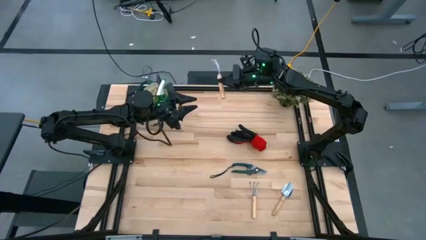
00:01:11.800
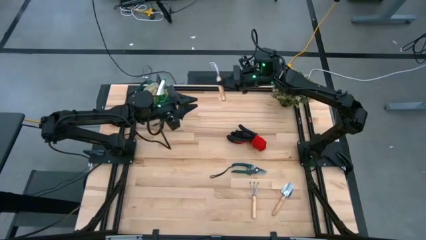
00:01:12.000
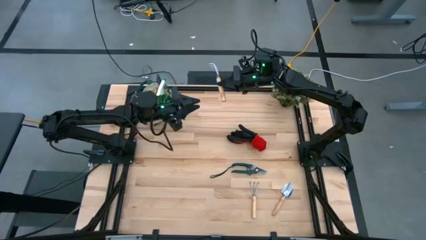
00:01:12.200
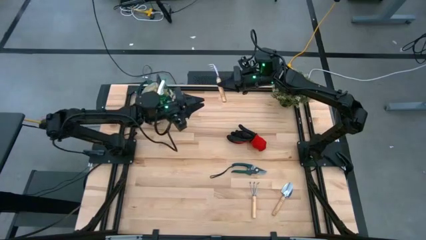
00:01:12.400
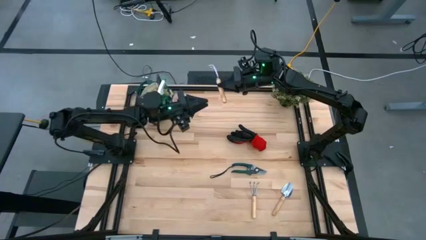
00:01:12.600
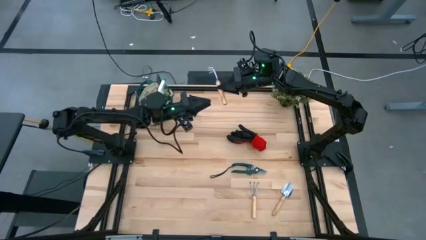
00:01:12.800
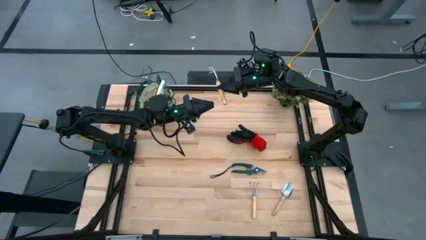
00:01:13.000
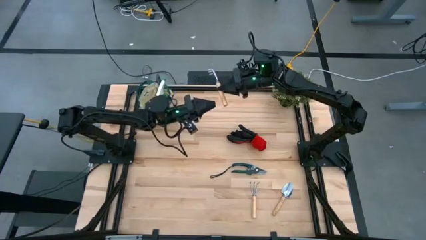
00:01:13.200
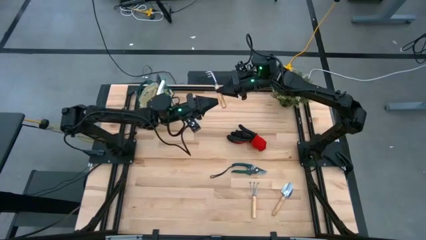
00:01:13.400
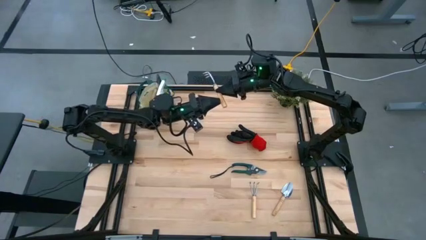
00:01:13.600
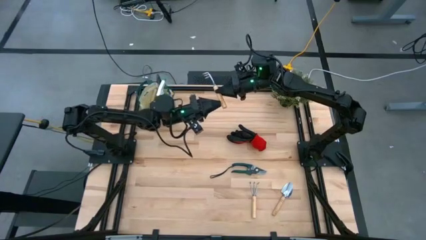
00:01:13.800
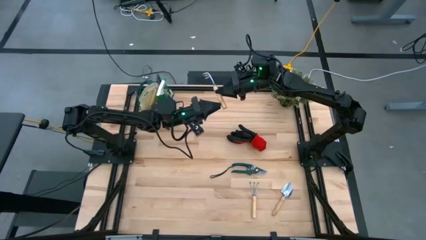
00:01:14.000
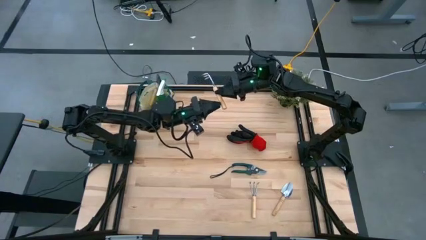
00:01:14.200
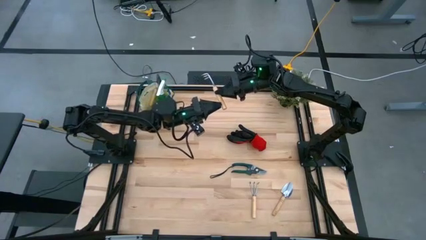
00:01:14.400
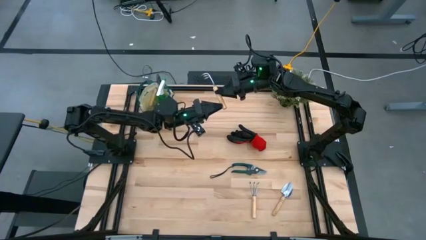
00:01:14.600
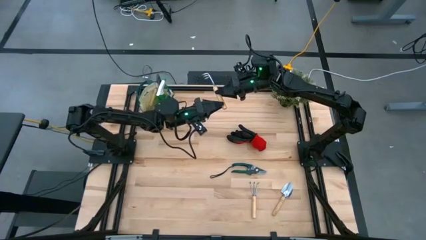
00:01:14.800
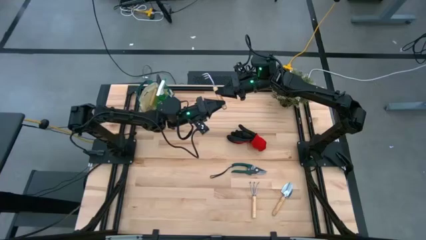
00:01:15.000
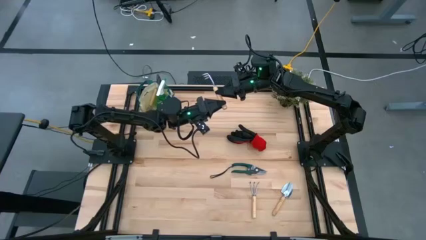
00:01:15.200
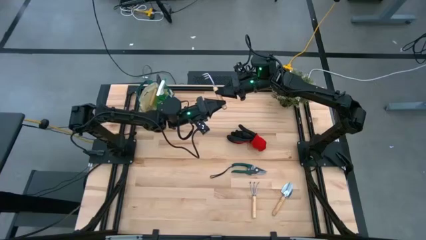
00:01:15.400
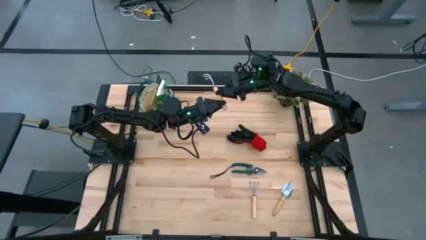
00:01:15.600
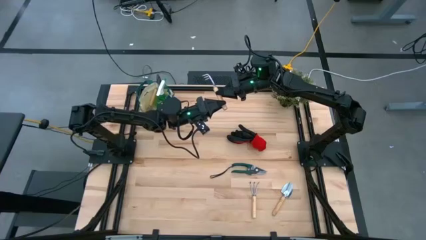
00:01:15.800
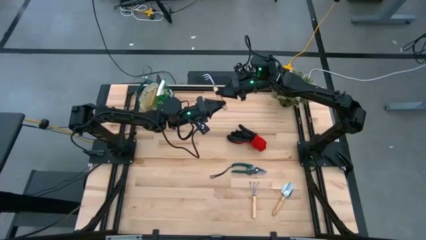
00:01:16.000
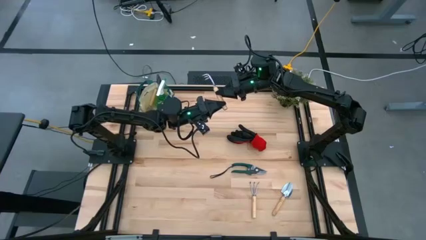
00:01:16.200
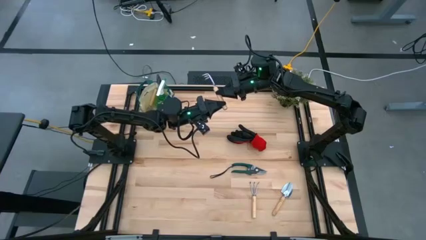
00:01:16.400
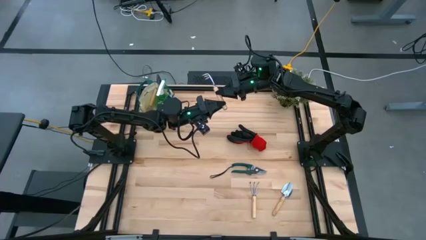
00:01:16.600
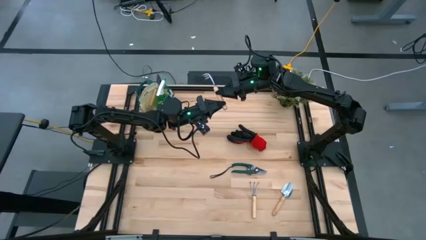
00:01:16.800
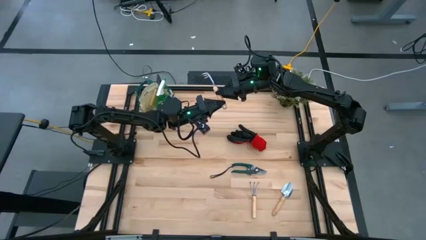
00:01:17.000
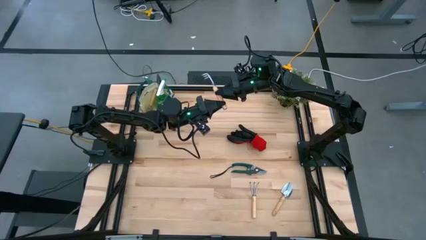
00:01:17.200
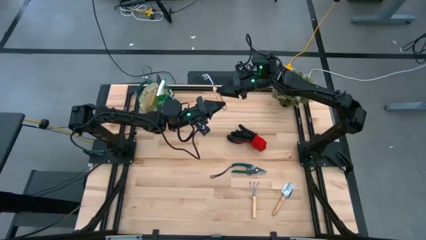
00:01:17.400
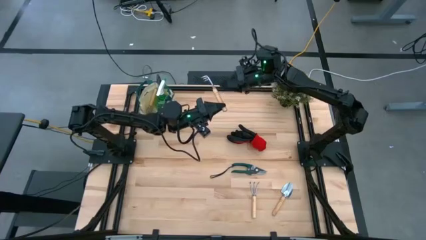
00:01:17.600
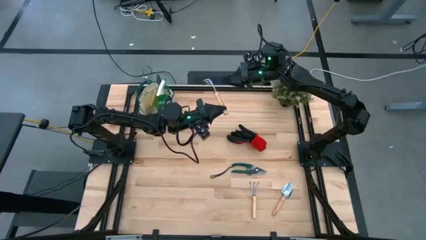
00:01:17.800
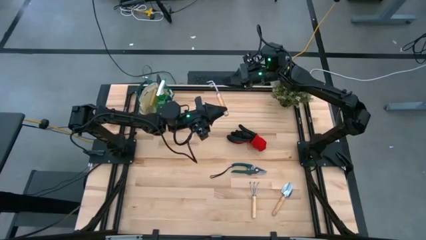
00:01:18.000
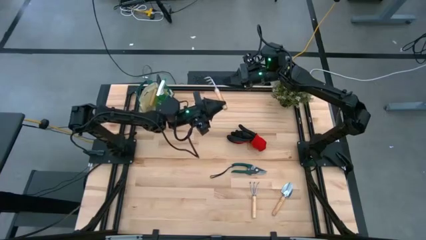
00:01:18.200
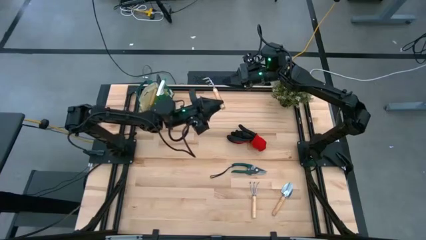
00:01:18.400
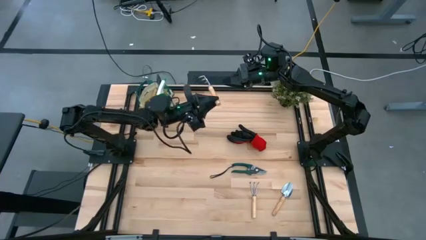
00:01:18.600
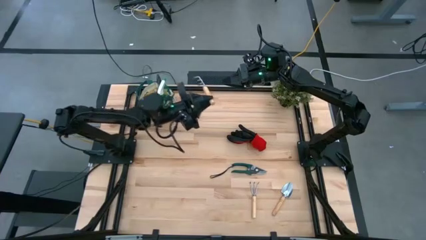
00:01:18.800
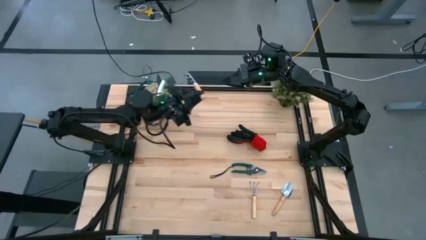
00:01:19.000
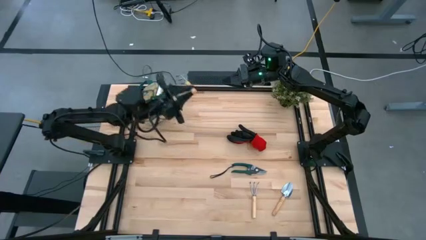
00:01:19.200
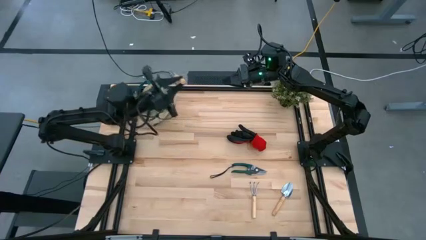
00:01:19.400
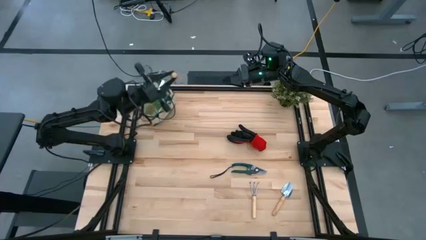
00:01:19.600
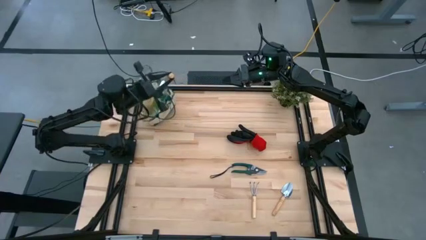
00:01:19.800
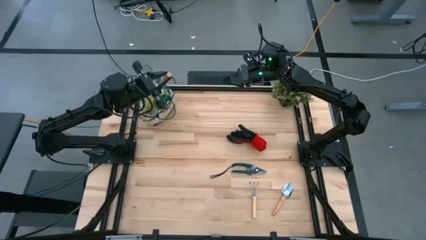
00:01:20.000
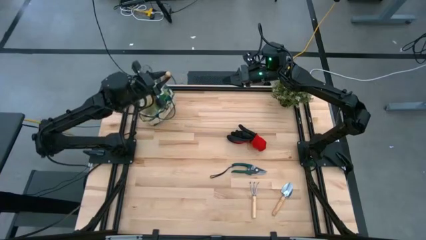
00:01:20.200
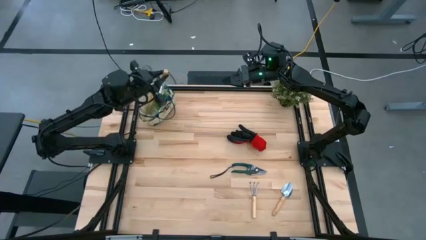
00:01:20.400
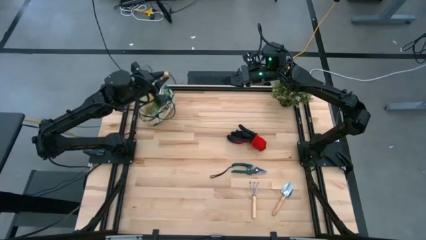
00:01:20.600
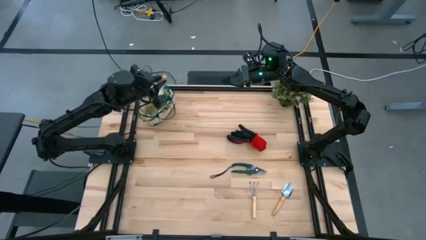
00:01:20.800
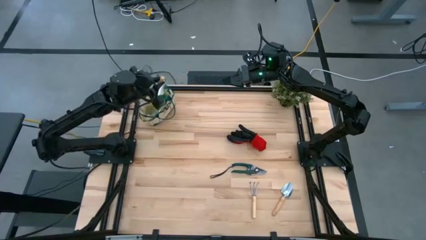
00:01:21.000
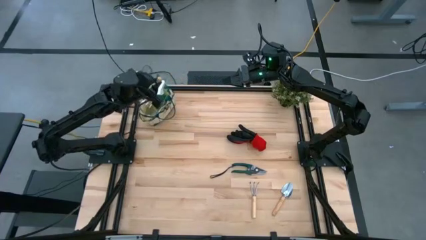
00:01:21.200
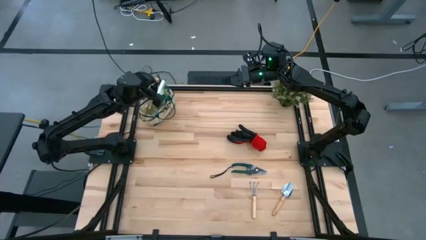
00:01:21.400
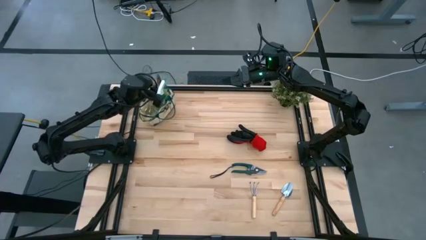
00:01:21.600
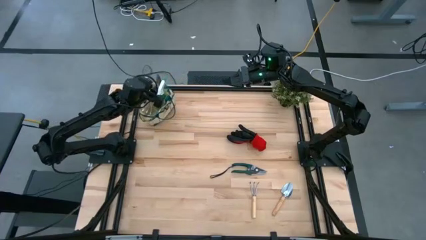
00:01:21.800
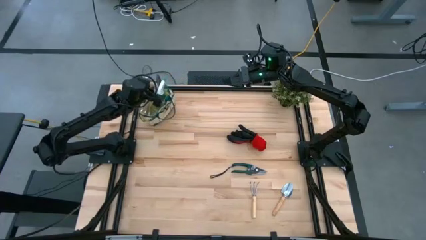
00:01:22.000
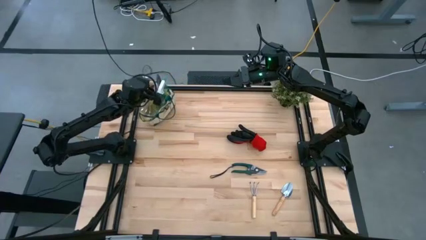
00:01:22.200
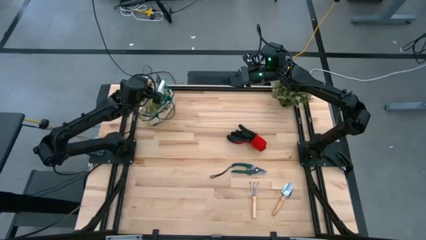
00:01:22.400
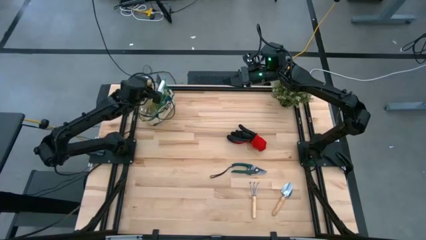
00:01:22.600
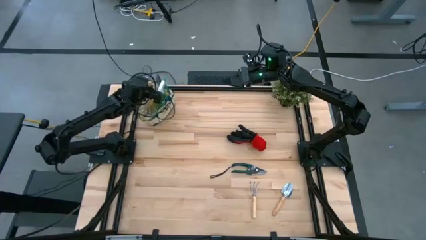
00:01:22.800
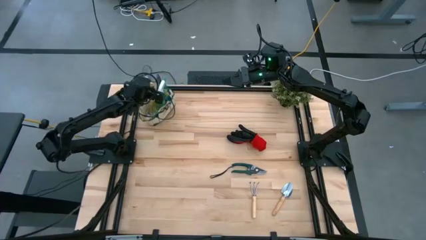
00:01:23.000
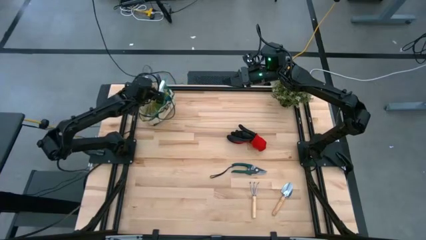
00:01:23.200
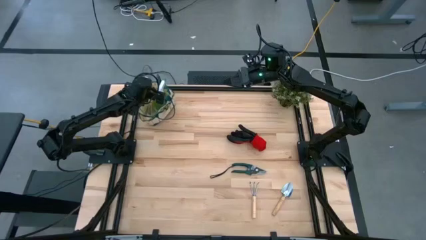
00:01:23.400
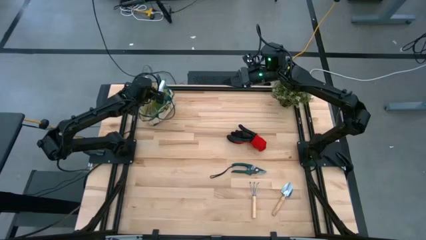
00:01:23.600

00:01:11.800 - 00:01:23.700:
Task: Pick & Place Garden tools in Gardening bag
Put the top brown hand rake into the gardening bag
